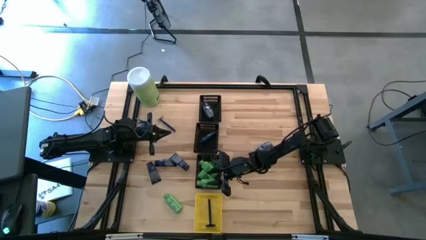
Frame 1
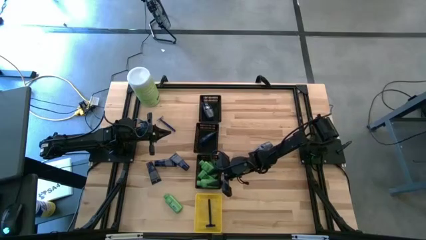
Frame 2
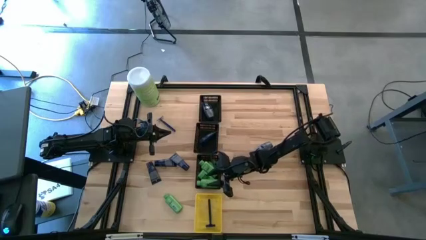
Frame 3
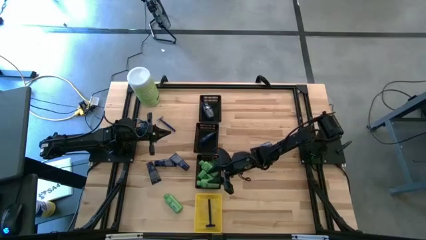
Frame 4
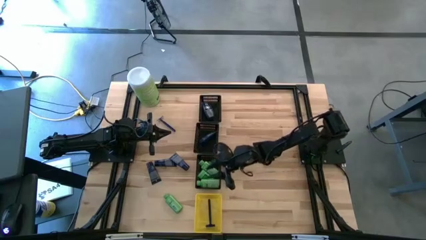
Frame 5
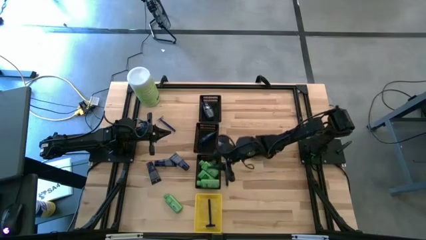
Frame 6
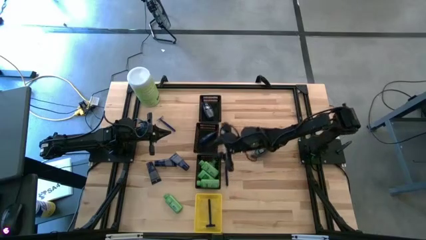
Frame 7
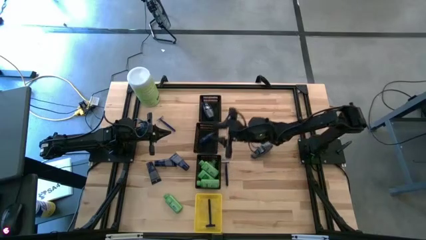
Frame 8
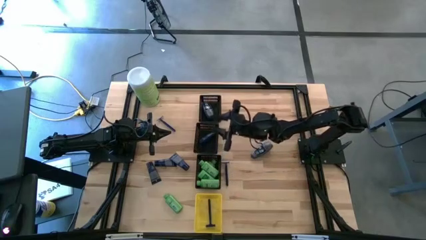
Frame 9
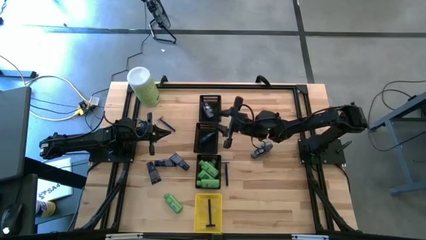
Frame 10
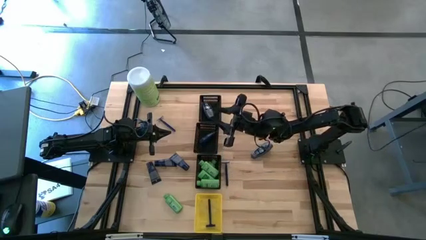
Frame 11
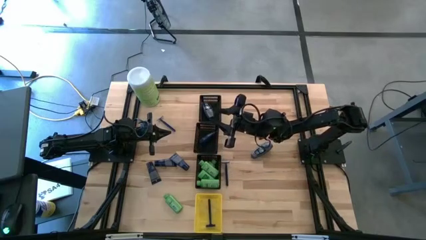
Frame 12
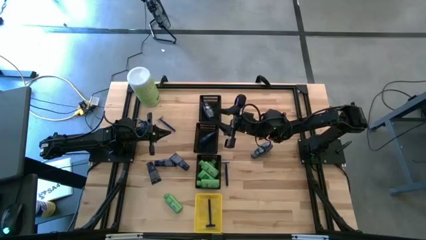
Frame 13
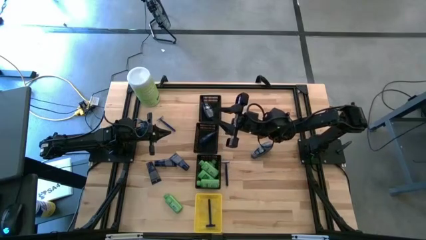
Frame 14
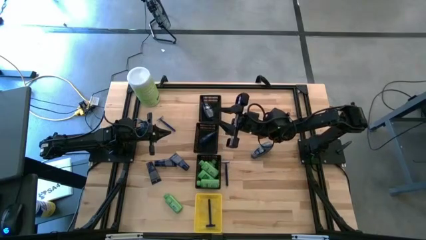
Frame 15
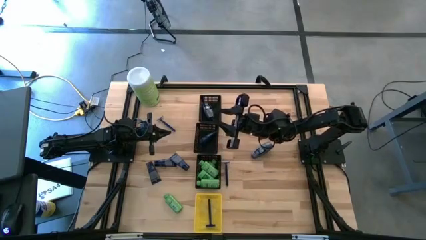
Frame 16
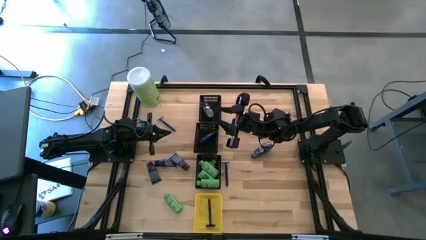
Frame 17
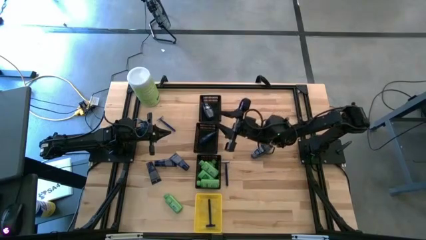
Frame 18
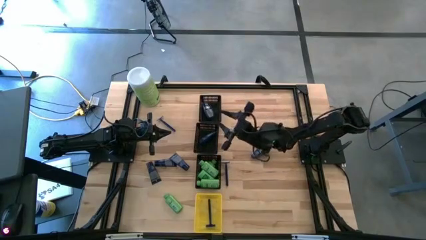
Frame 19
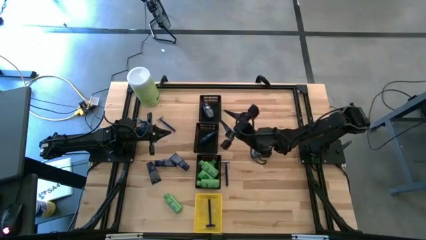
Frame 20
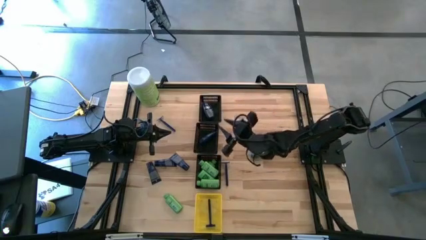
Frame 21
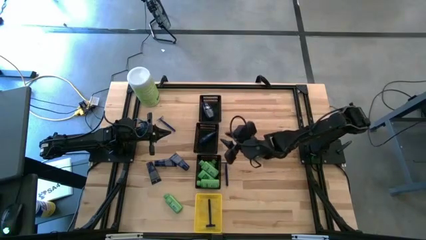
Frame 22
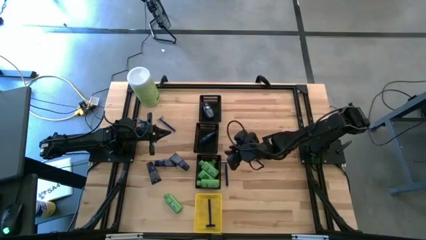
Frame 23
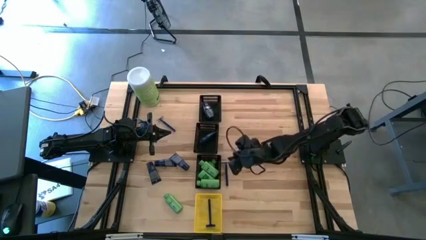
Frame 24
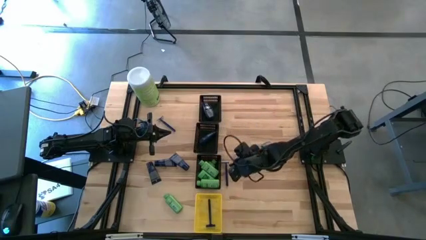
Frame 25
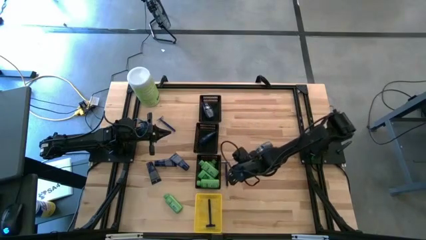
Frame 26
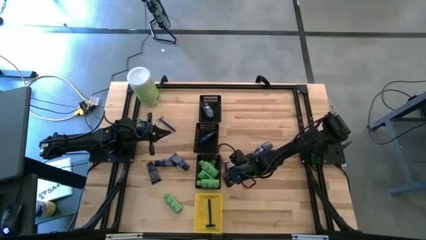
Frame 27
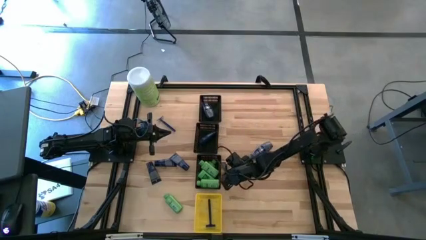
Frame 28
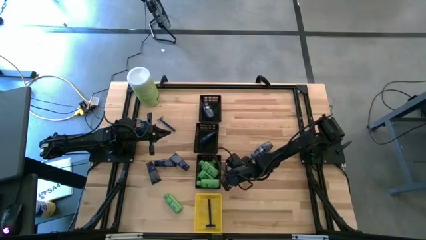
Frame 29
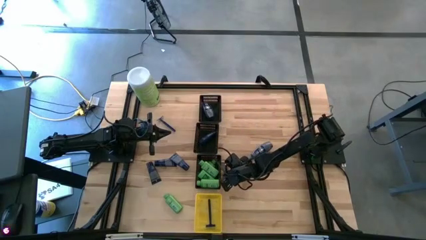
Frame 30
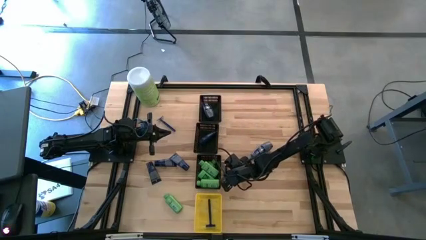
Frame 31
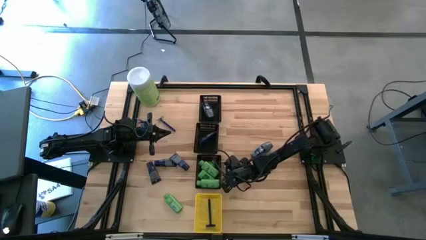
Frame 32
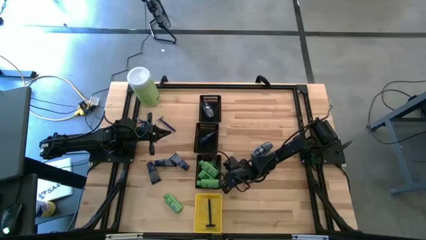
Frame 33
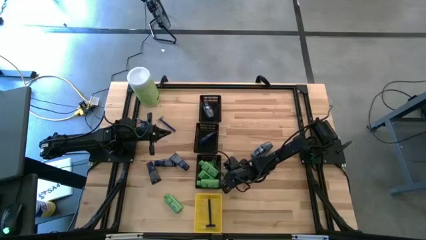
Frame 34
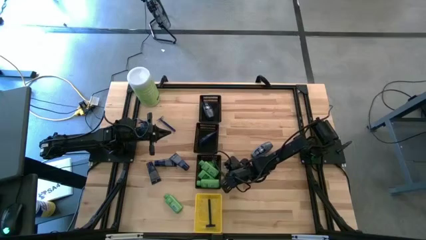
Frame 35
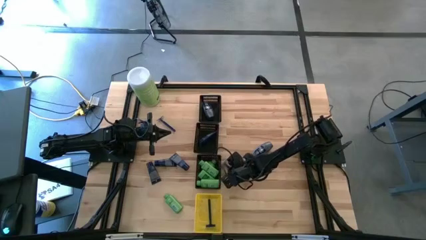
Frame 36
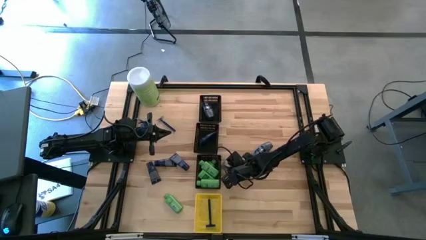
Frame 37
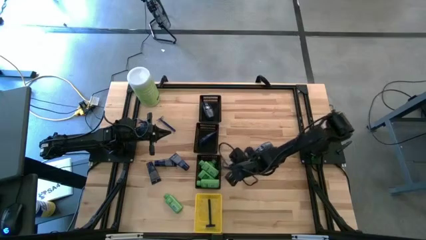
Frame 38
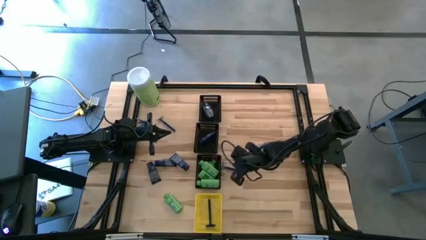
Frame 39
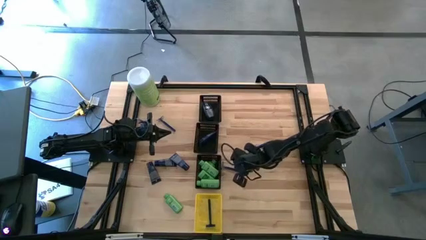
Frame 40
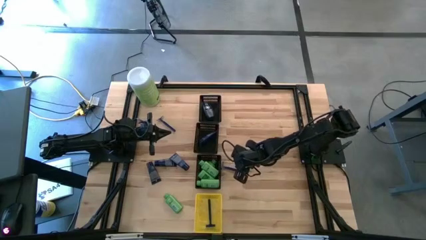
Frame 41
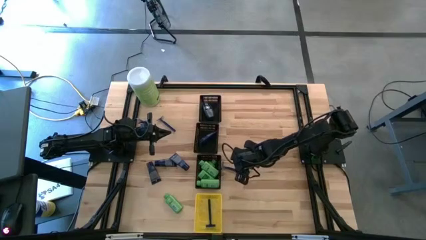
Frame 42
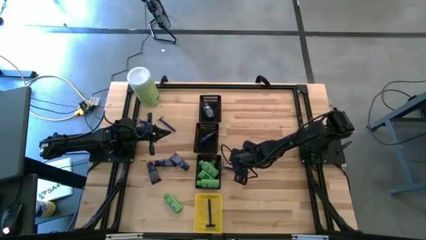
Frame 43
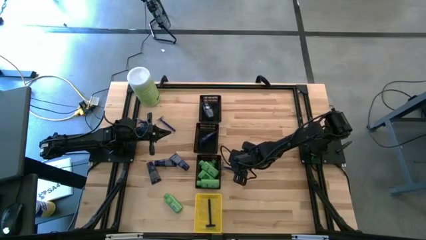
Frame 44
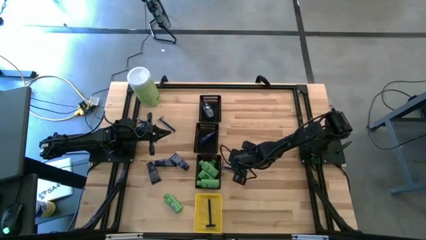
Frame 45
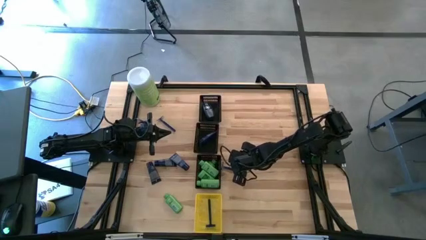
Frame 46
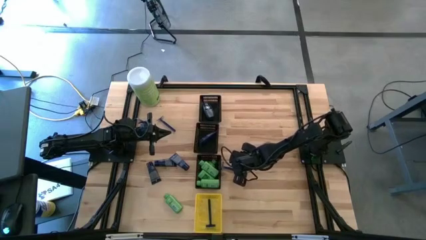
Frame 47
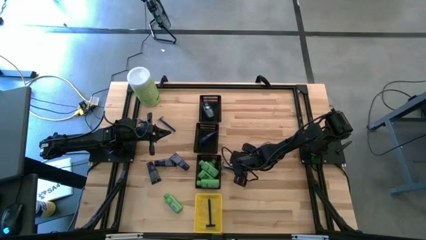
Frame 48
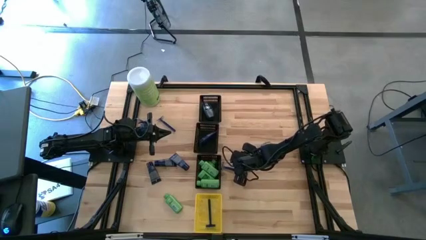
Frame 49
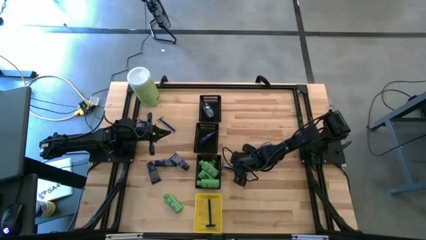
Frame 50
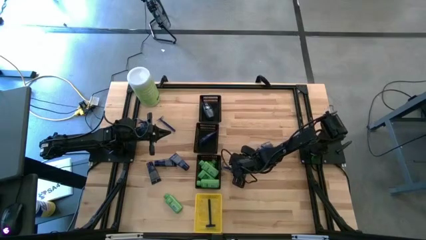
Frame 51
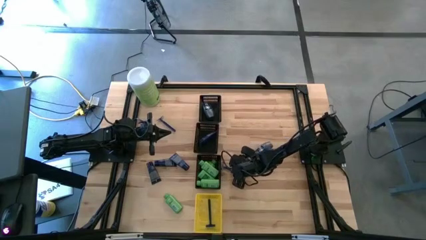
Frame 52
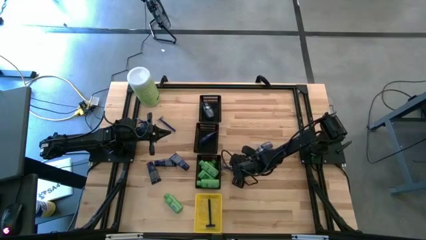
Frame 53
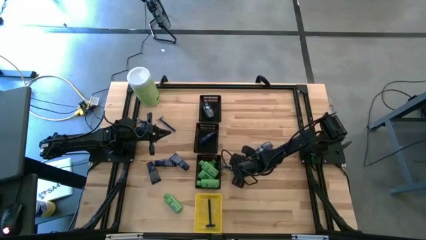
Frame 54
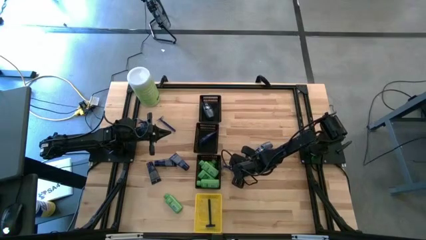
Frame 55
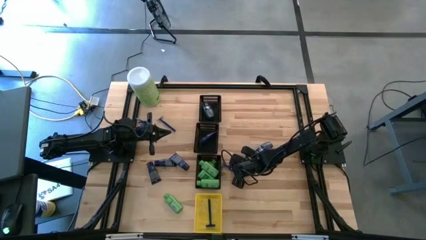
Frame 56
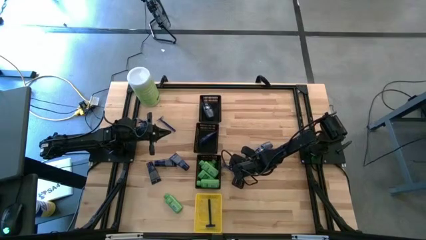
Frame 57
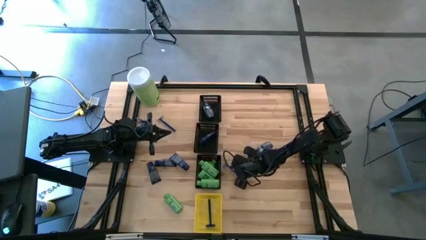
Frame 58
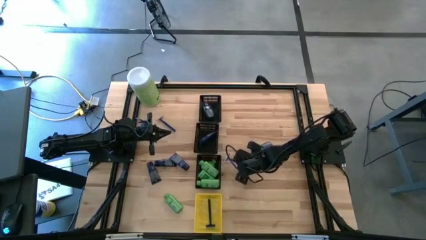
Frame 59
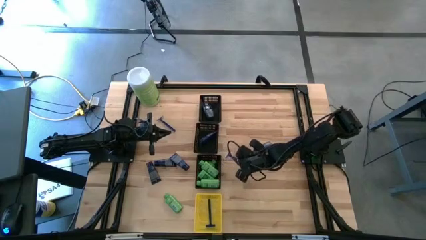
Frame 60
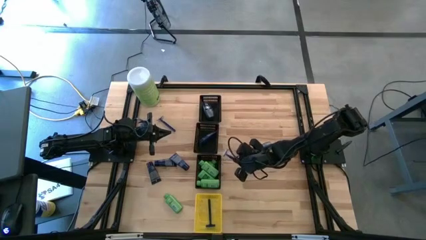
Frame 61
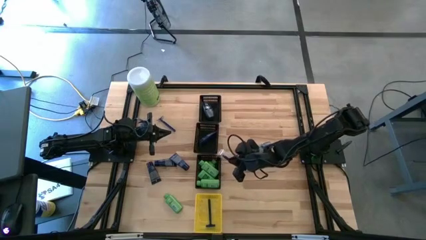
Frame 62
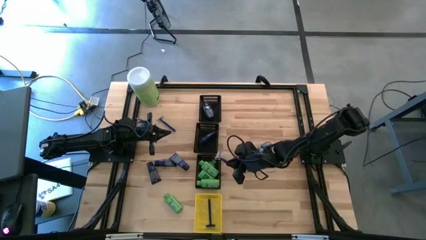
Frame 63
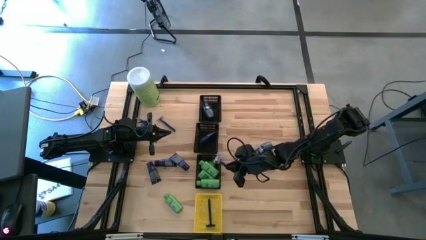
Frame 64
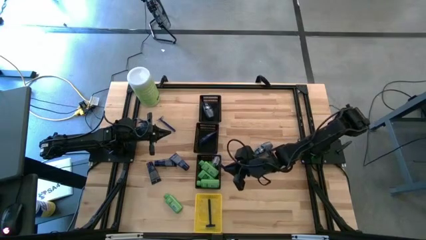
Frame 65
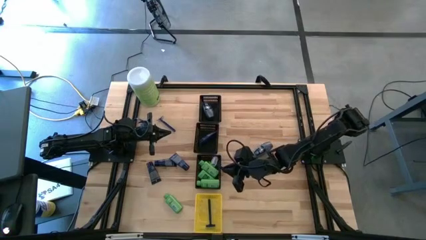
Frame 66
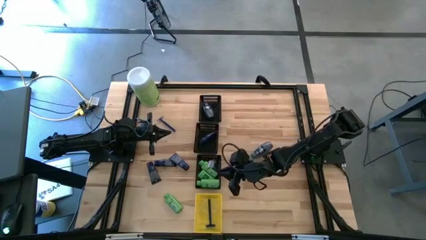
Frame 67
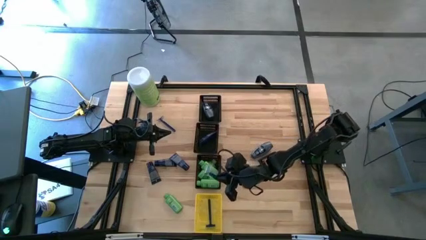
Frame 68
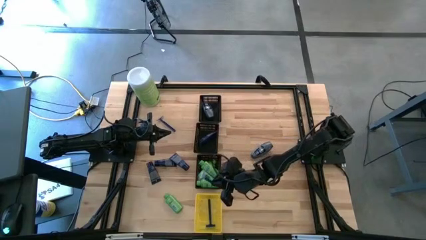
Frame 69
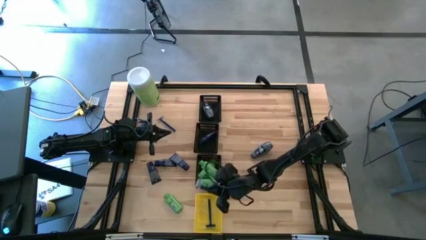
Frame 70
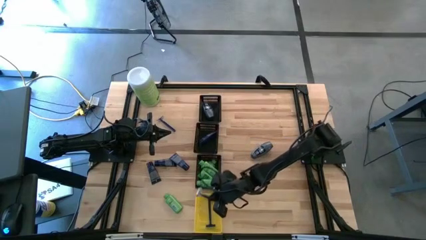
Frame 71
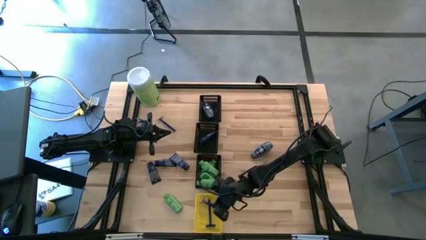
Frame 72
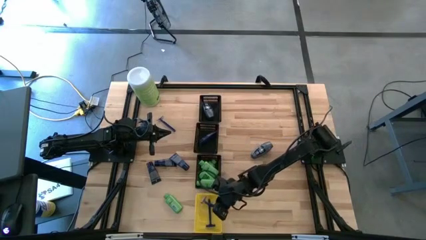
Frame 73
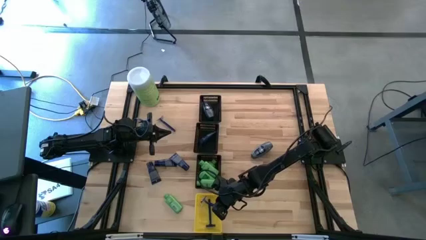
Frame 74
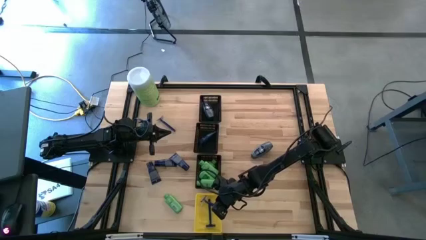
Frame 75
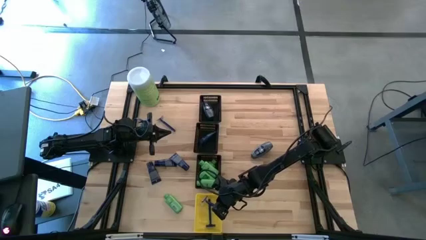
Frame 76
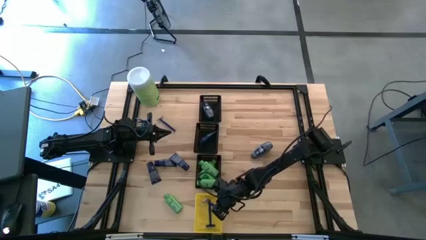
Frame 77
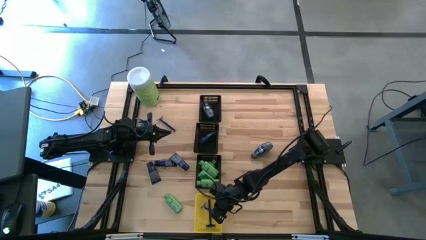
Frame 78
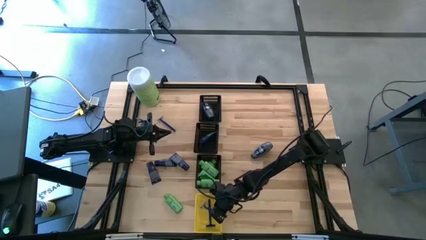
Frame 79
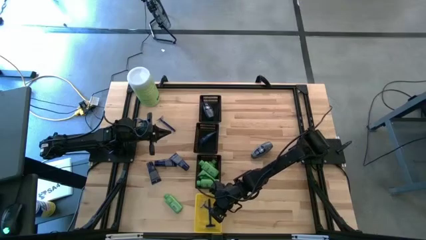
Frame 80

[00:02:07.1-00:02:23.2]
Task: Pick & Place Travel size toiletries
Put the blue razor into the yellow bin
